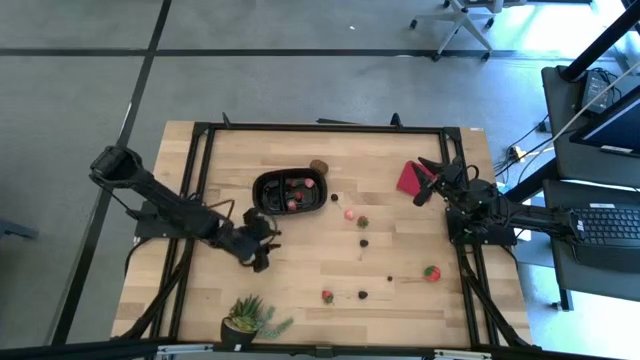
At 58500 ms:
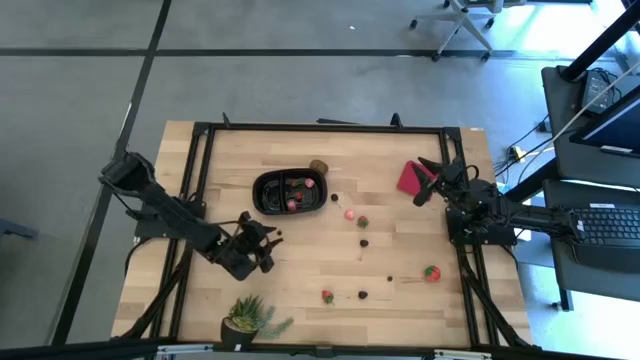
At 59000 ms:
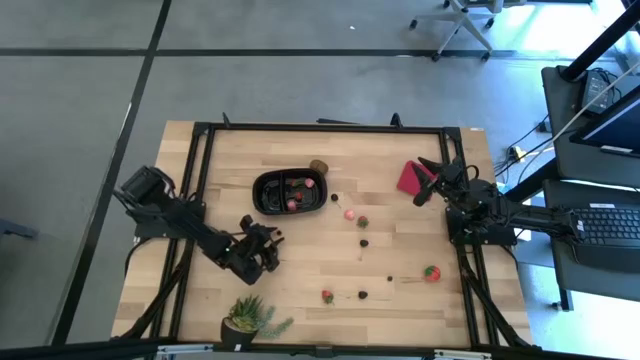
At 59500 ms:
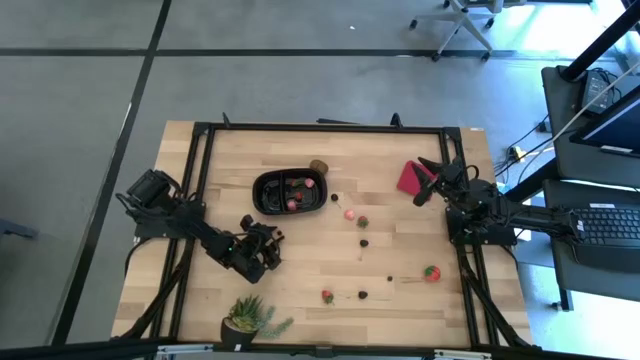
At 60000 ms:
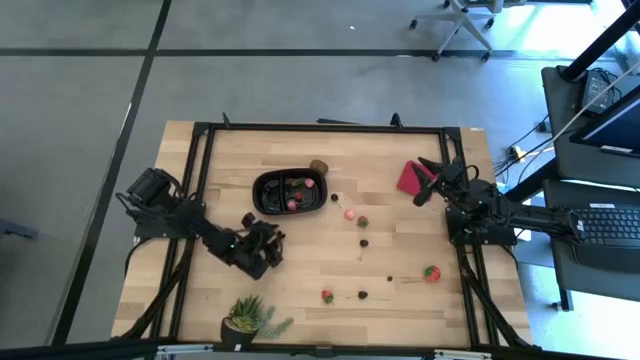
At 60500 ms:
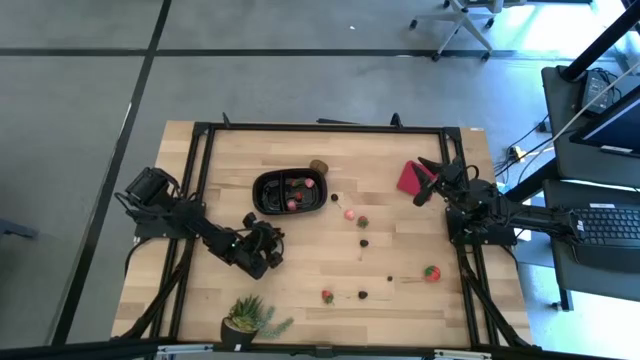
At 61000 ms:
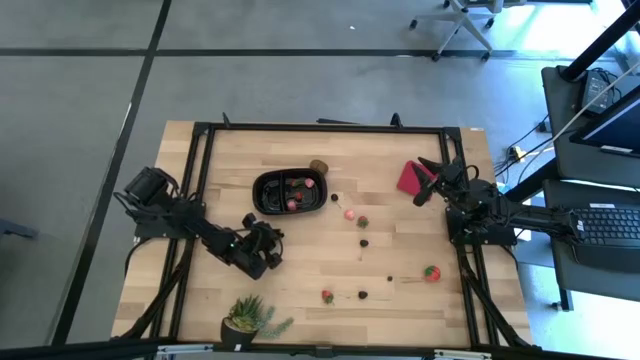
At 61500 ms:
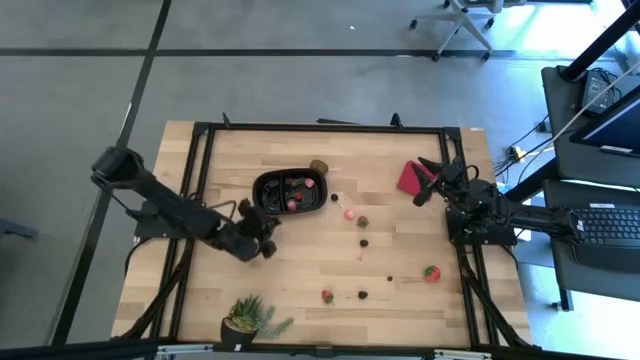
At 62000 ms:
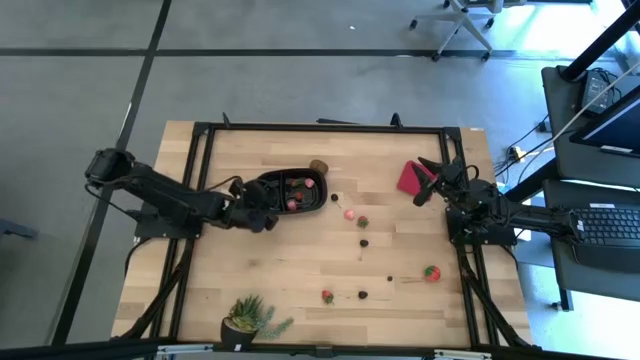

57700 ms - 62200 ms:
Task: Pick and placing Produce into tupperware
Put the blueberry into the black bin

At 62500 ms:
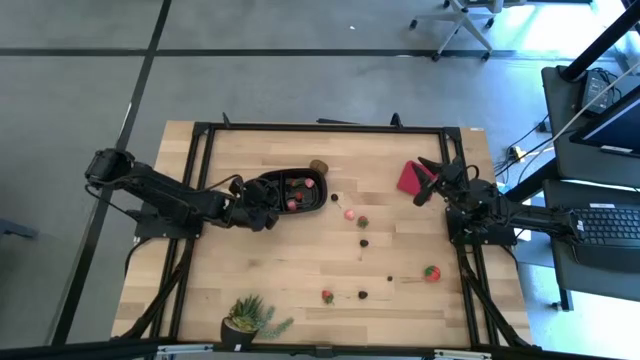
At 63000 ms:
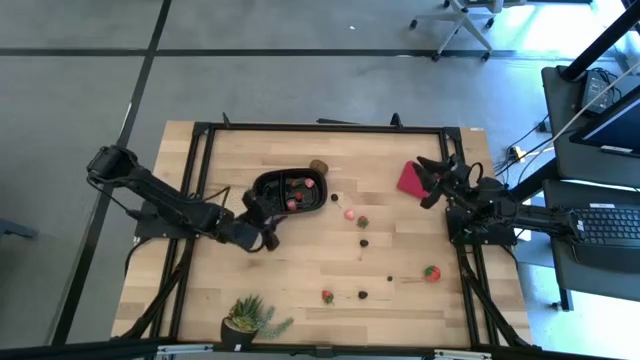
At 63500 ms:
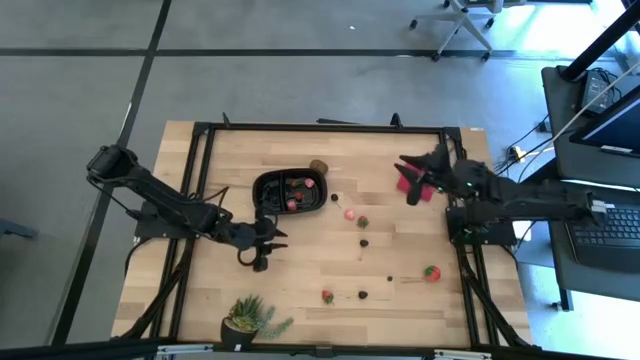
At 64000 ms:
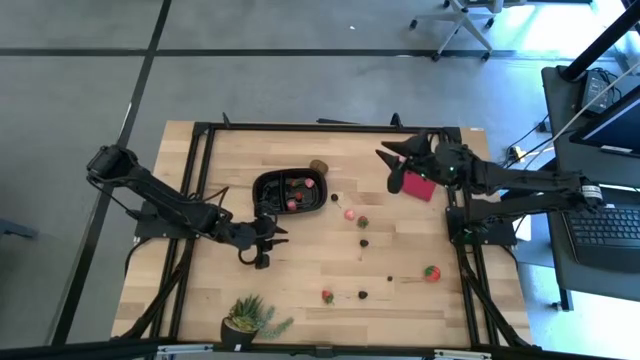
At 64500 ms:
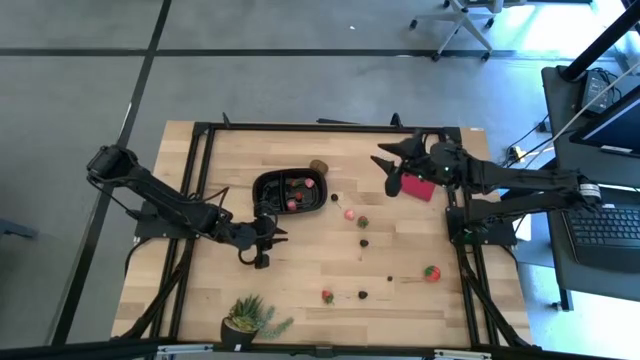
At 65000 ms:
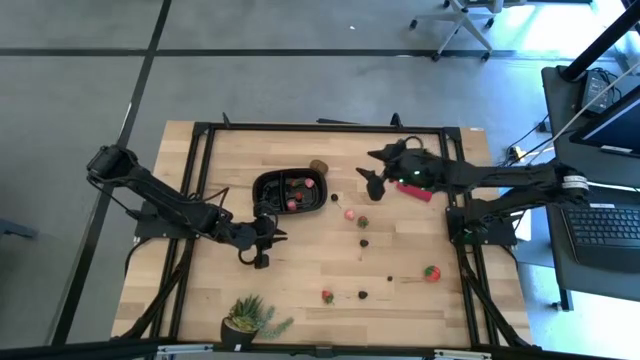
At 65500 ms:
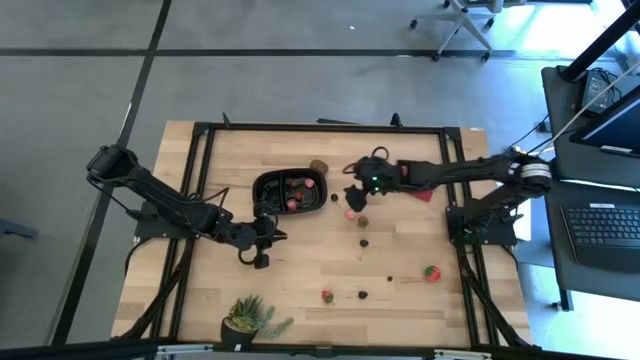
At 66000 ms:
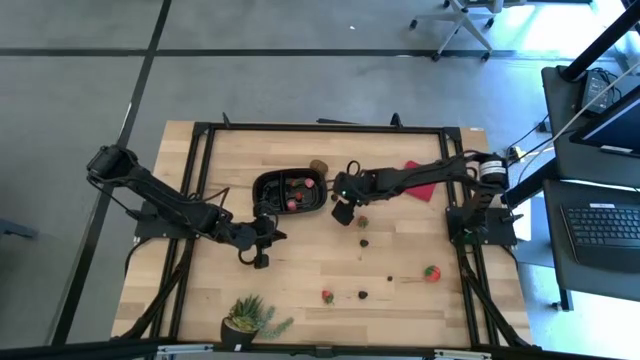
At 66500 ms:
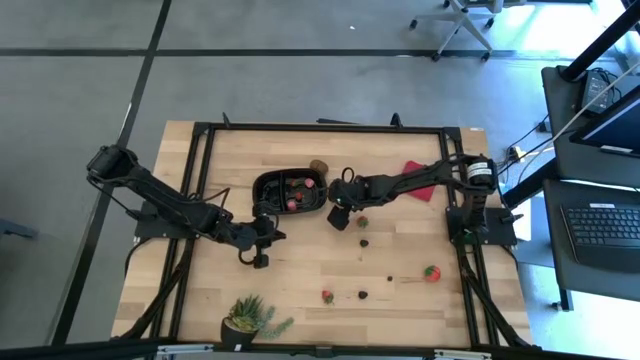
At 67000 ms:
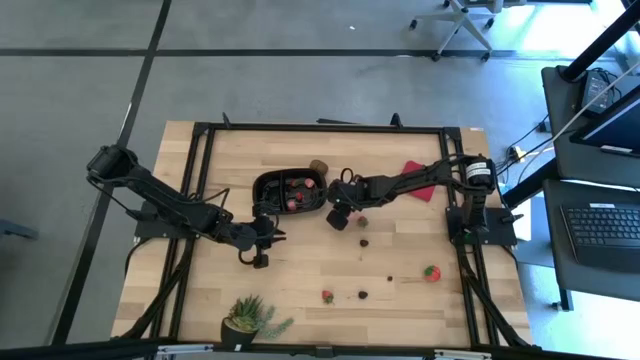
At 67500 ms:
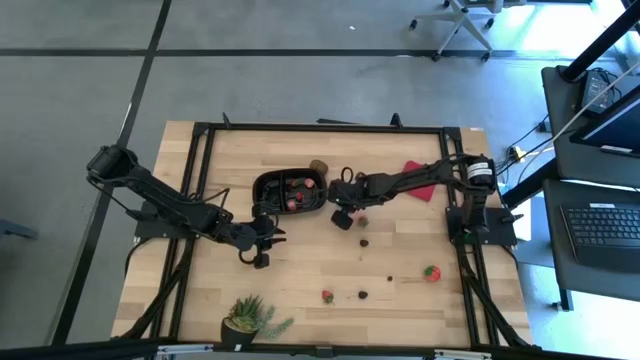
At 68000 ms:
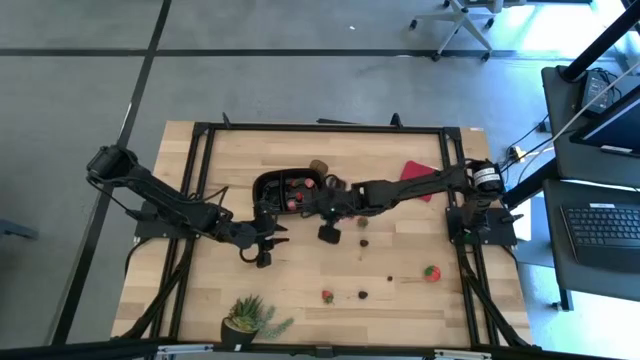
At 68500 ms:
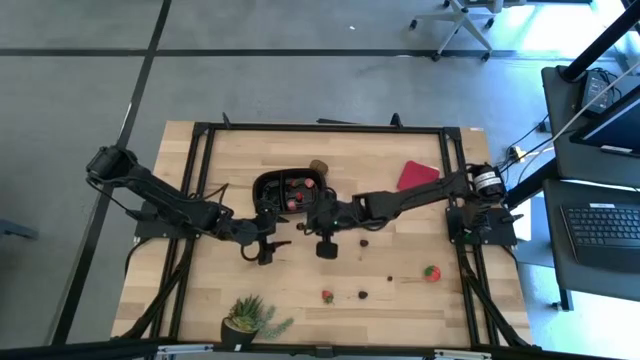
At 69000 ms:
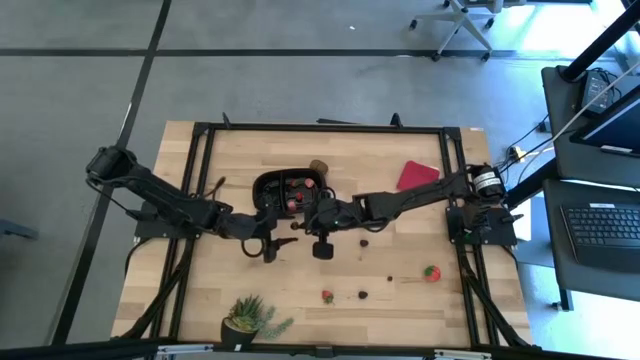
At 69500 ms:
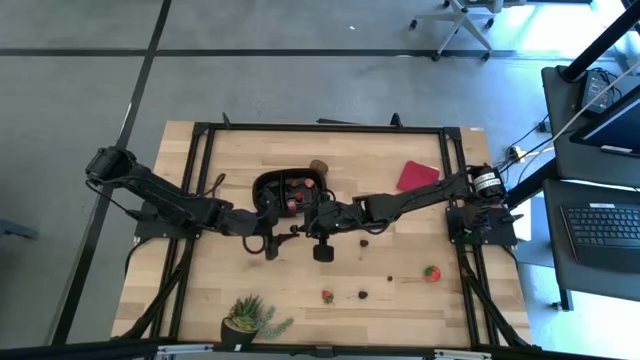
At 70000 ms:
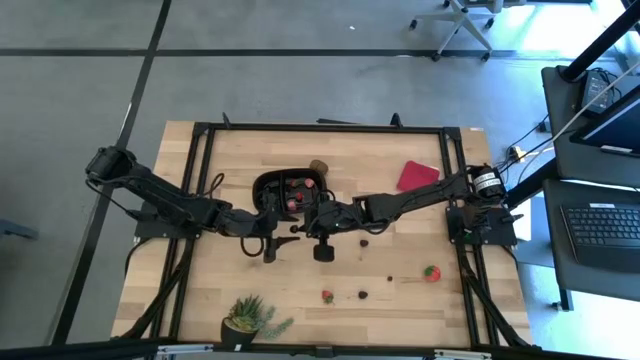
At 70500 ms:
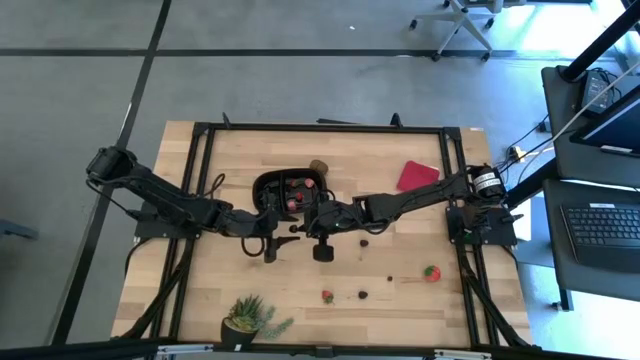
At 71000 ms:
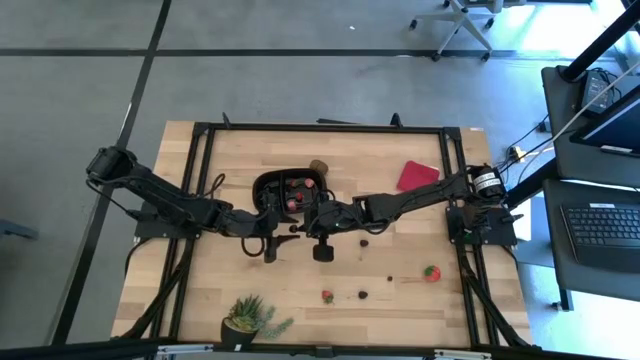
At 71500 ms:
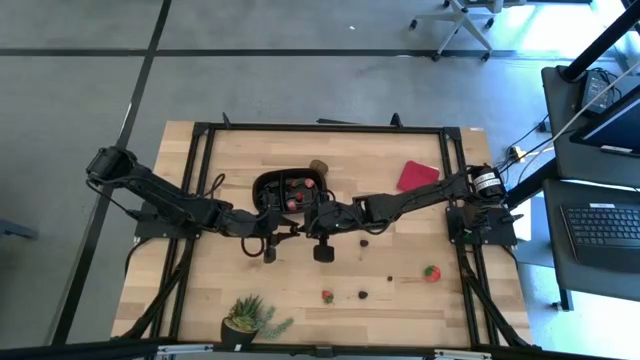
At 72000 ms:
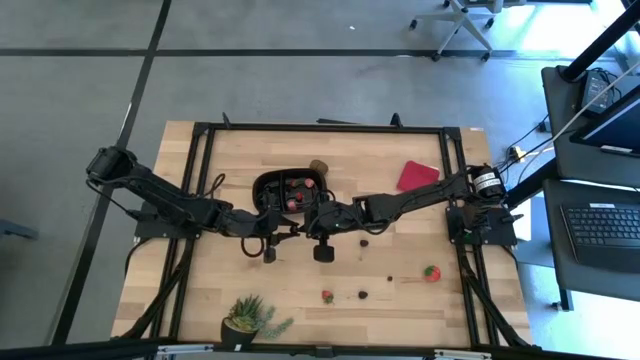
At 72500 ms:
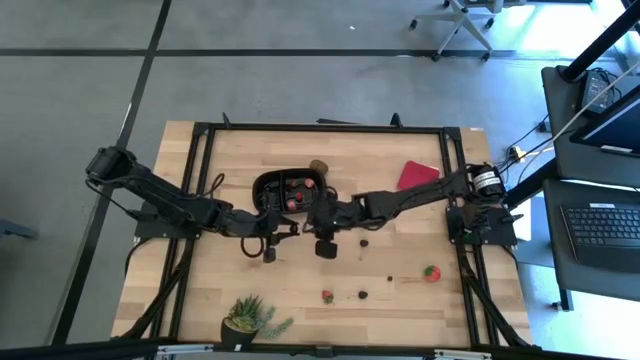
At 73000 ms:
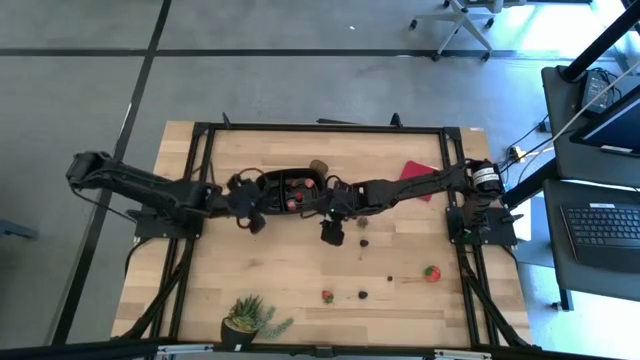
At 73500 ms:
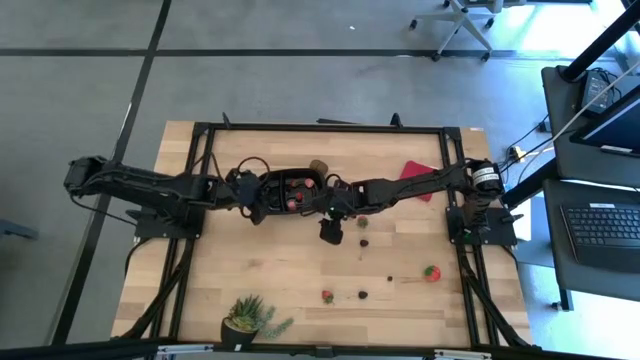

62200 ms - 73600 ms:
Put the black cherry into the black bin

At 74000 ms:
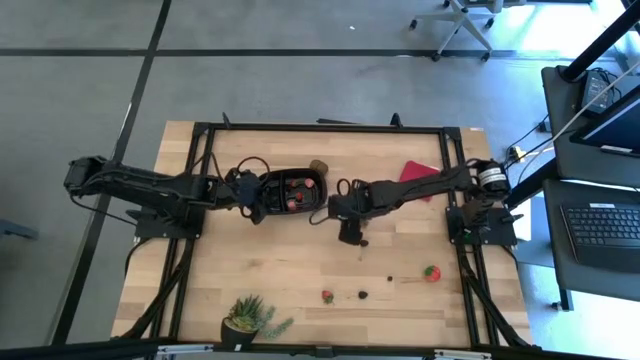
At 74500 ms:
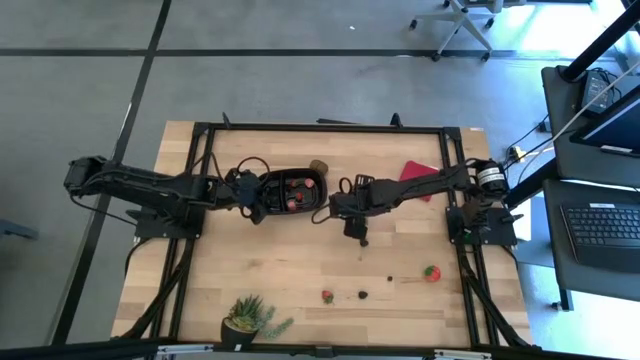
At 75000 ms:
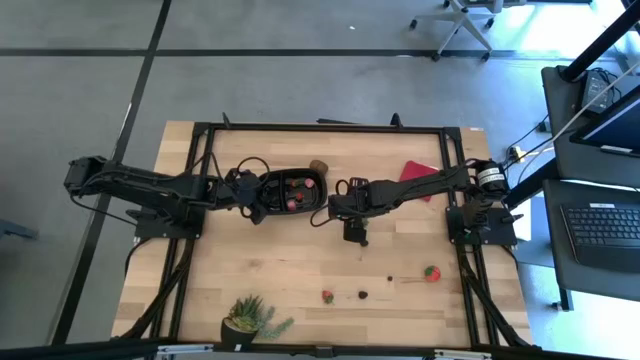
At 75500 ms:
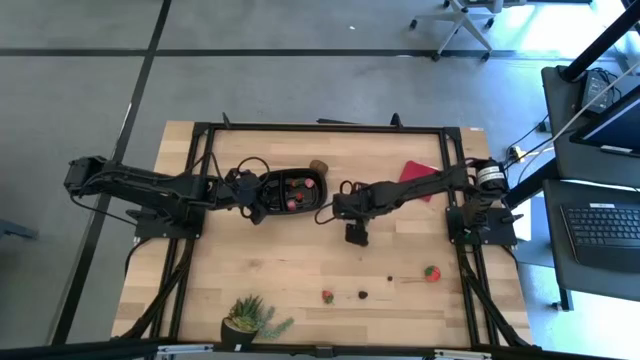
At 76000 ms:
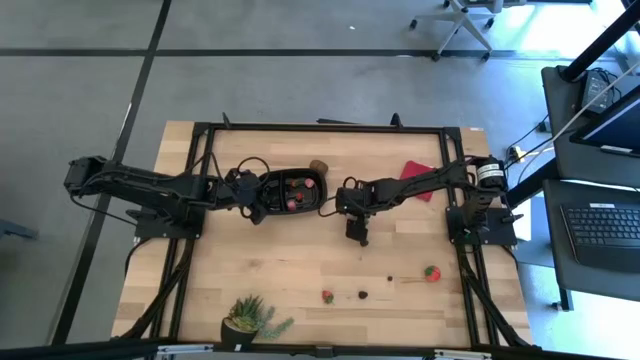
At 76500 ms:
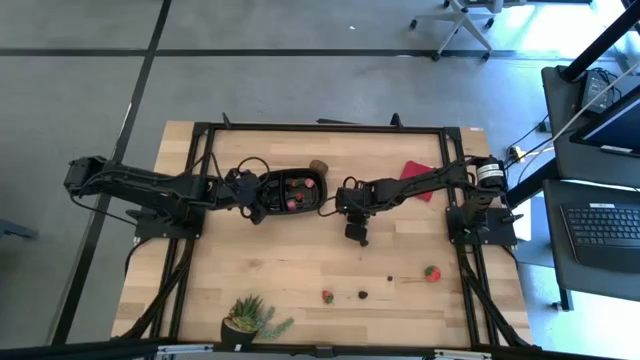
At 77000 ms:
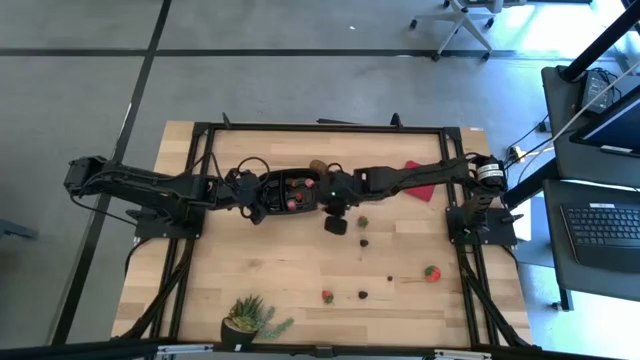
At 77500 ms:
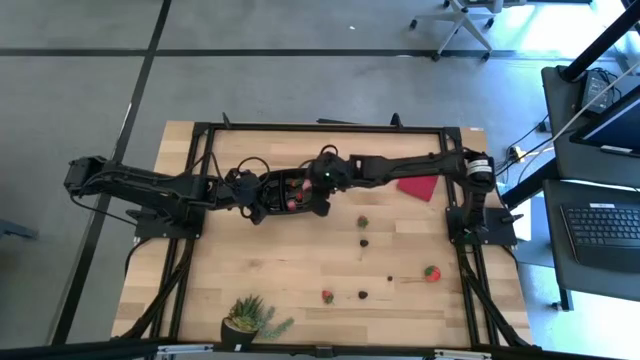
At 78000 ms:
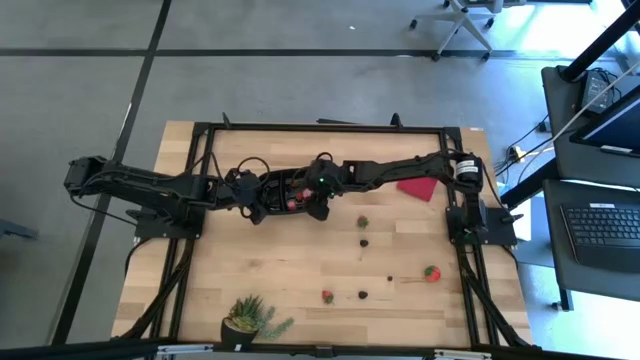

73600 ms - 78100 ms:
Put the pink peach into the black bin

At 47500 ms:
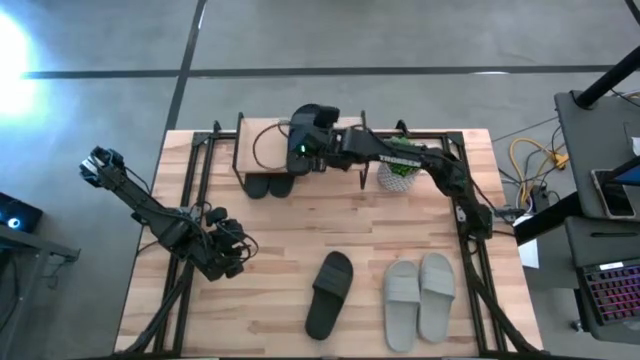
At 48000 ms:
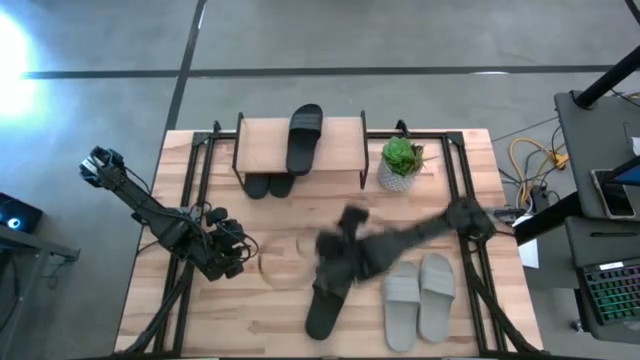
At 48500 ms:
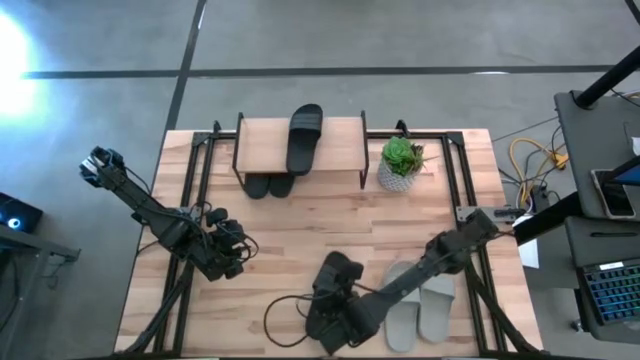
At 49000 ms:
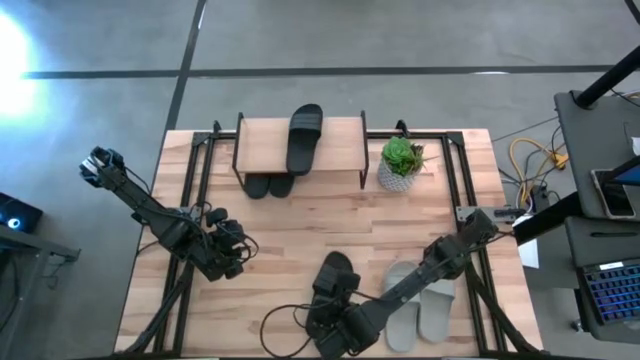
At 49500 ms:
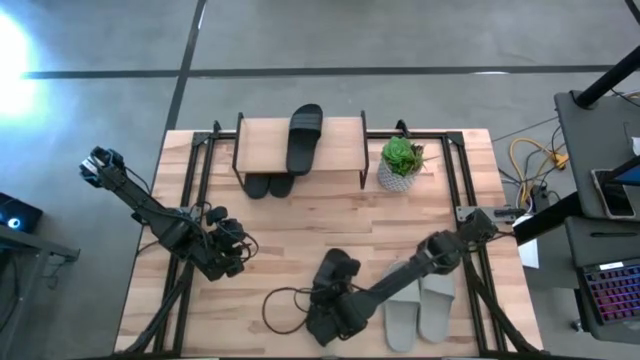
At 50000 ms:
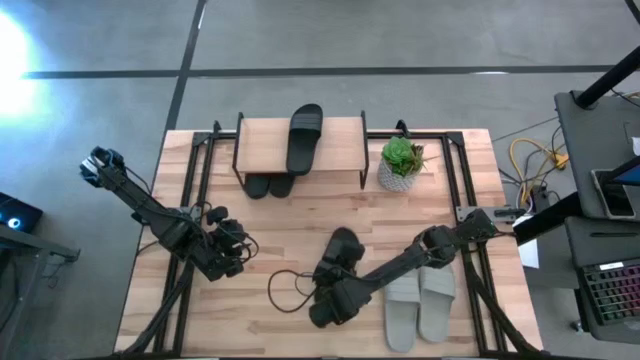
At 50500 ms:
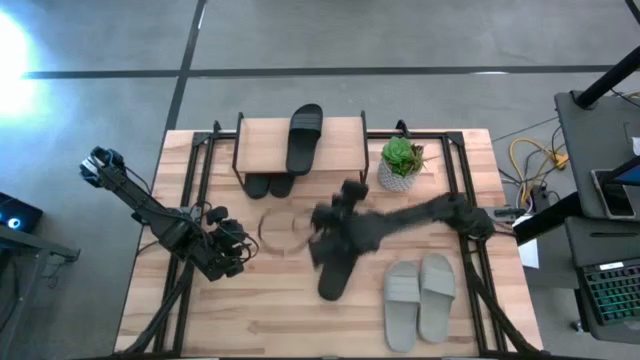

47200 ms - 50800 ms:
Task: Pick and place slides into the shelf
Put the black slide on the shelf
